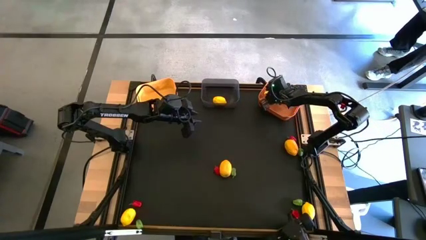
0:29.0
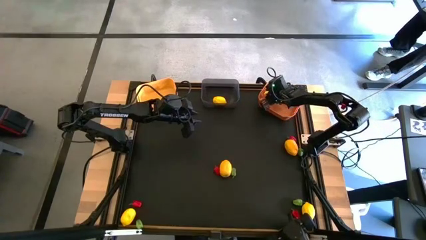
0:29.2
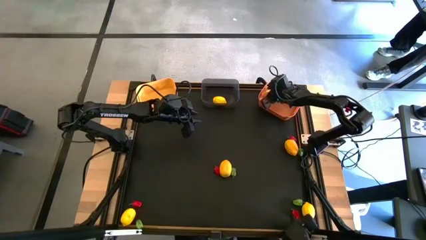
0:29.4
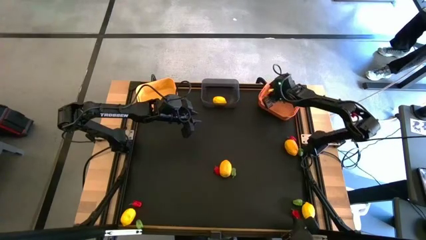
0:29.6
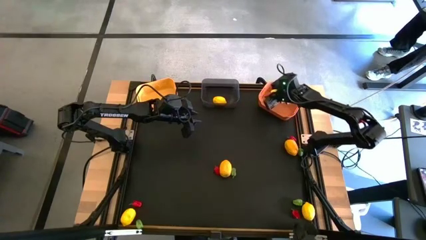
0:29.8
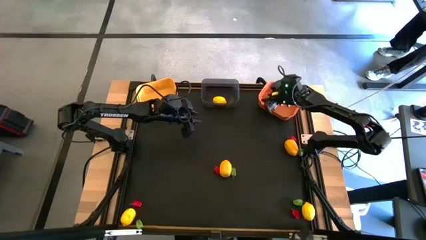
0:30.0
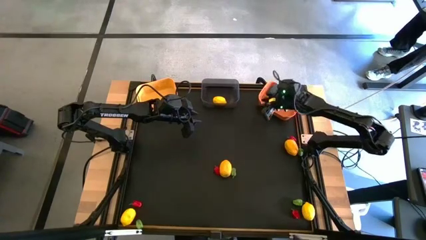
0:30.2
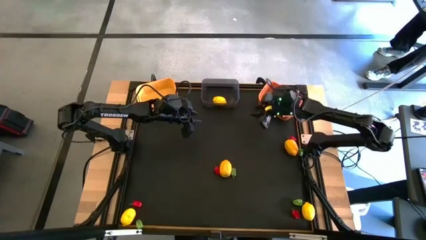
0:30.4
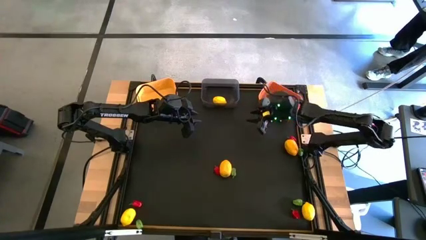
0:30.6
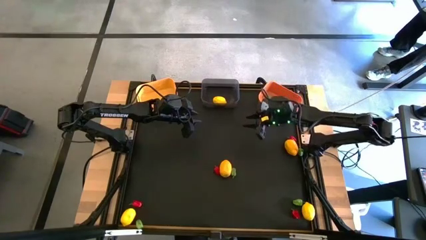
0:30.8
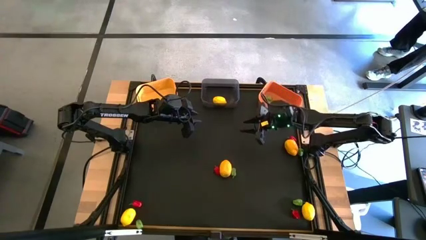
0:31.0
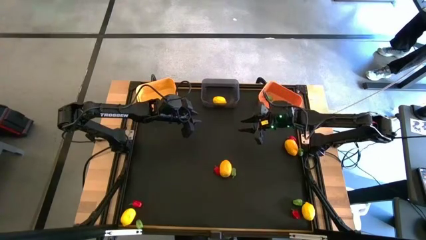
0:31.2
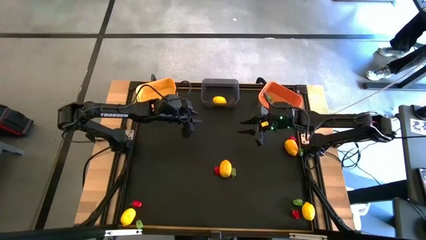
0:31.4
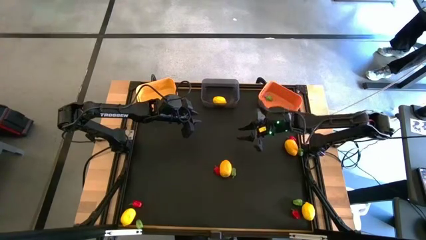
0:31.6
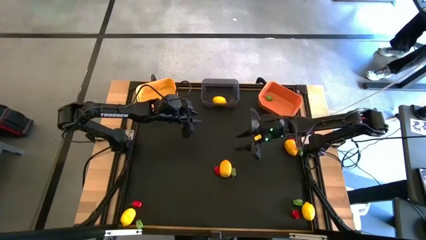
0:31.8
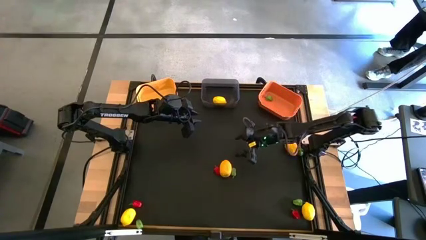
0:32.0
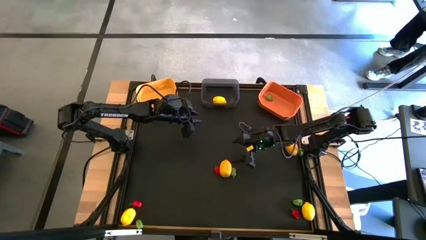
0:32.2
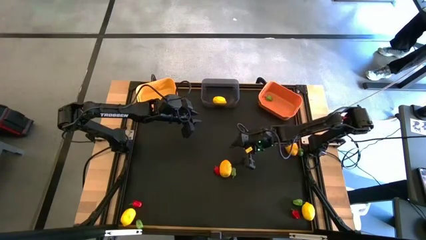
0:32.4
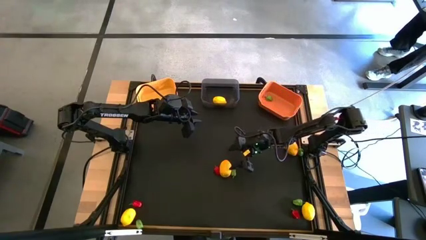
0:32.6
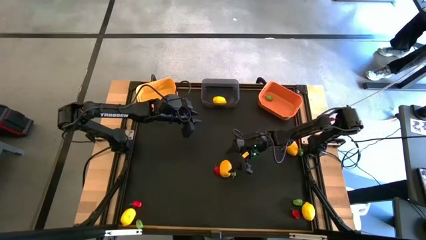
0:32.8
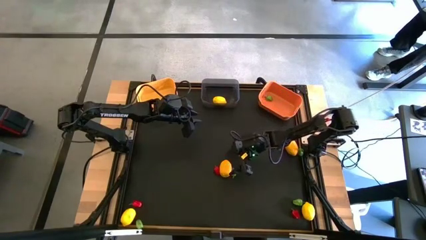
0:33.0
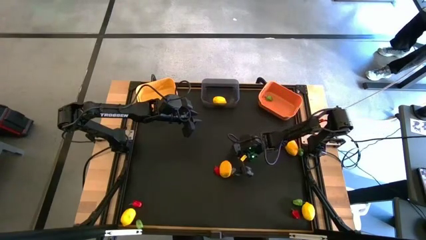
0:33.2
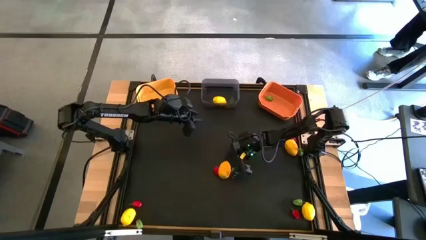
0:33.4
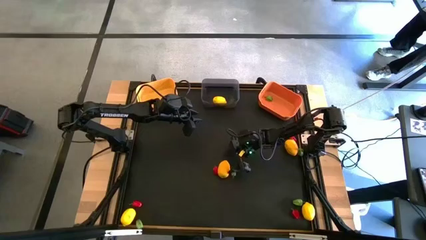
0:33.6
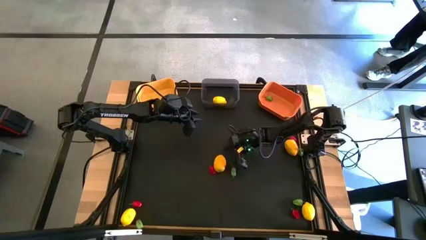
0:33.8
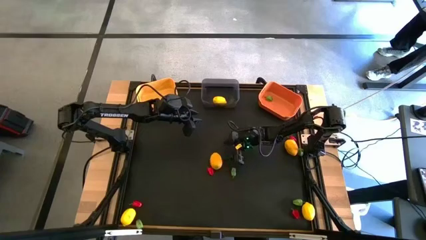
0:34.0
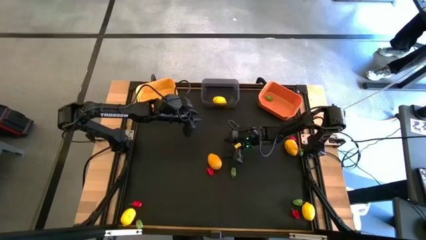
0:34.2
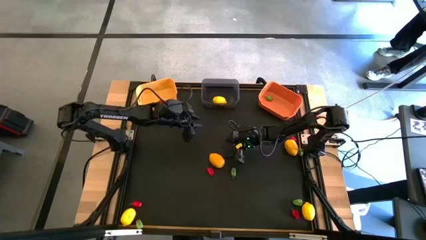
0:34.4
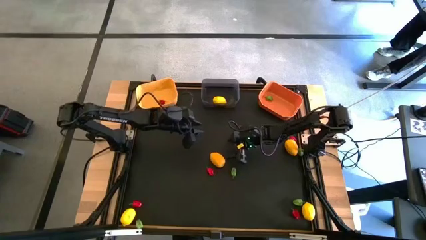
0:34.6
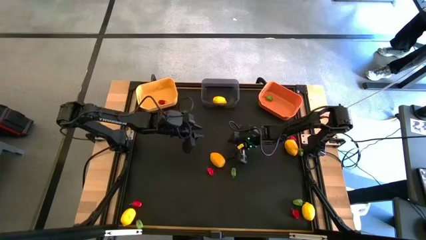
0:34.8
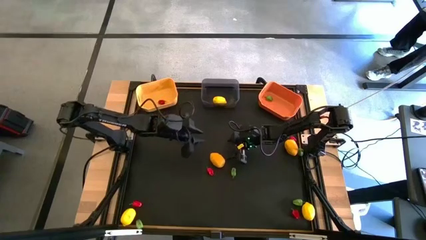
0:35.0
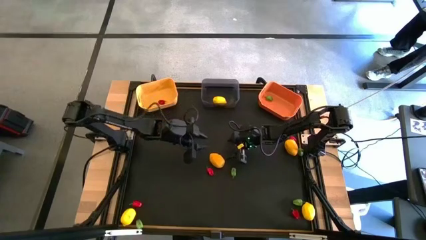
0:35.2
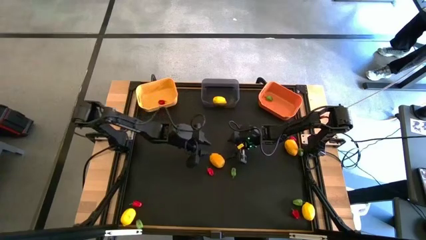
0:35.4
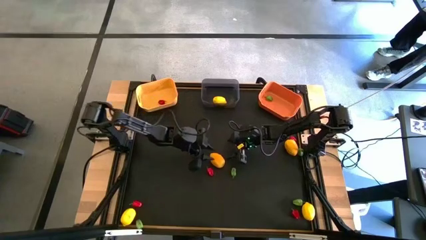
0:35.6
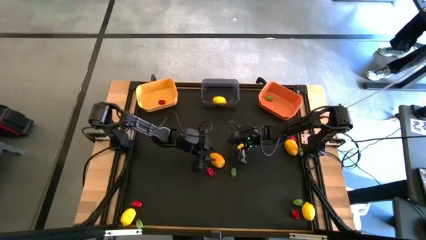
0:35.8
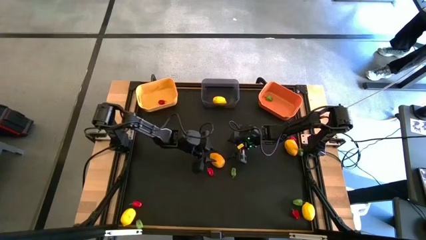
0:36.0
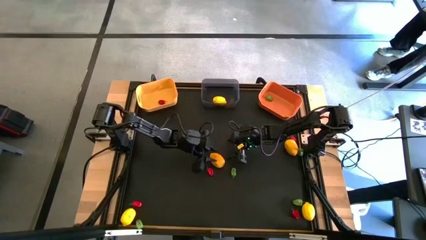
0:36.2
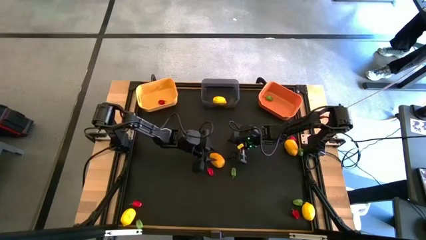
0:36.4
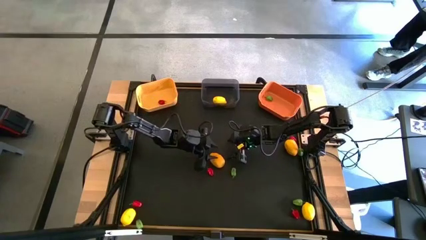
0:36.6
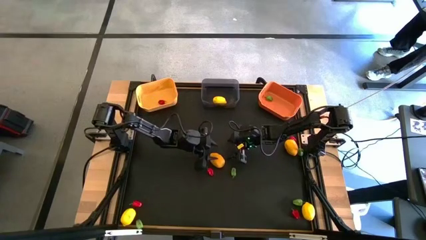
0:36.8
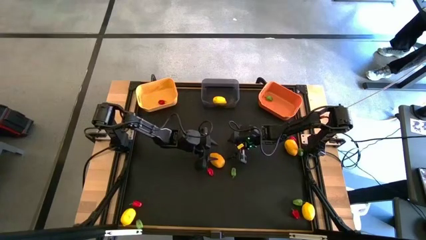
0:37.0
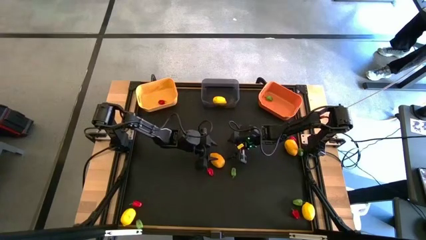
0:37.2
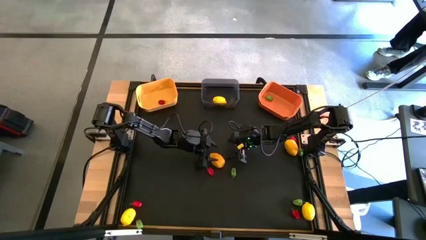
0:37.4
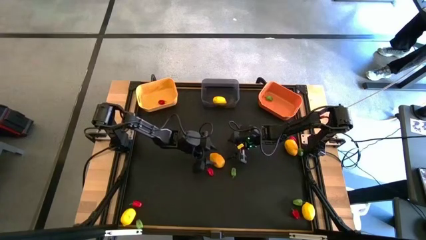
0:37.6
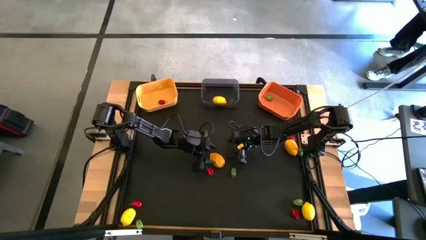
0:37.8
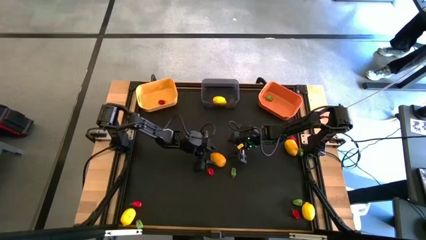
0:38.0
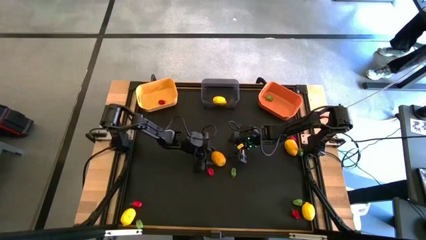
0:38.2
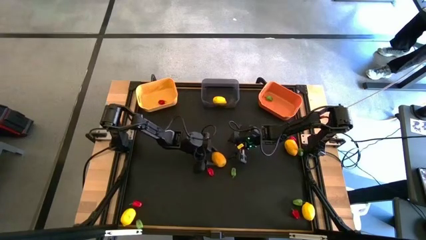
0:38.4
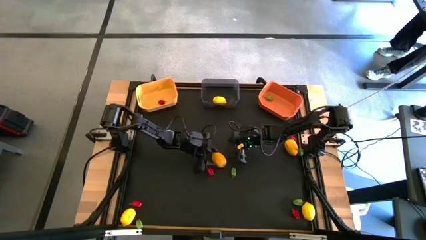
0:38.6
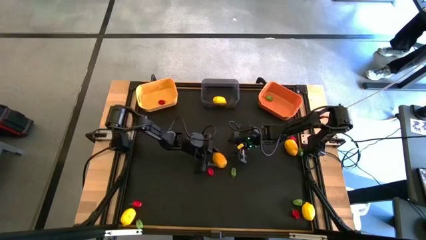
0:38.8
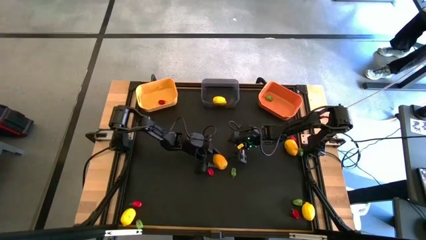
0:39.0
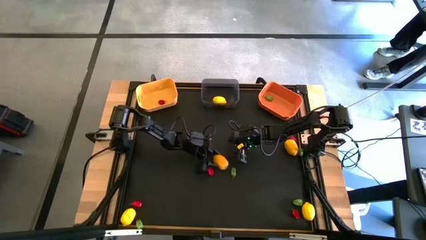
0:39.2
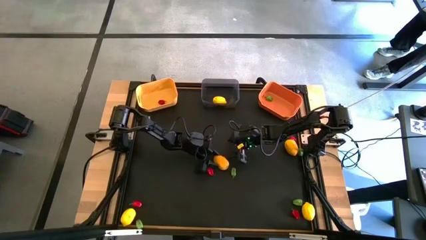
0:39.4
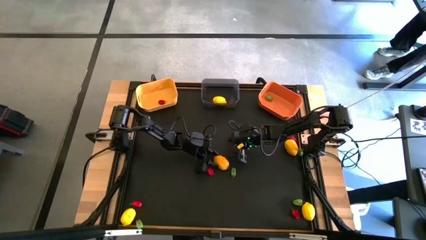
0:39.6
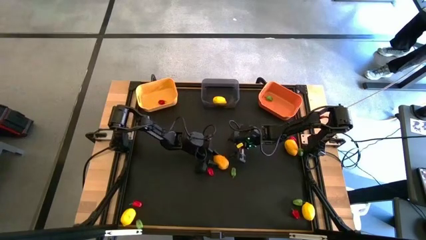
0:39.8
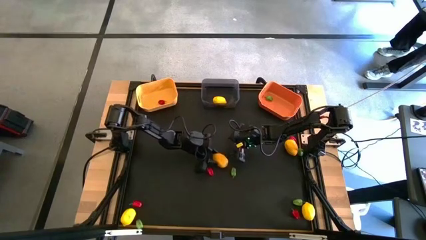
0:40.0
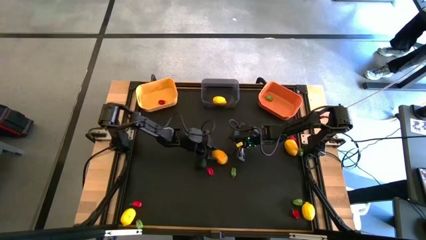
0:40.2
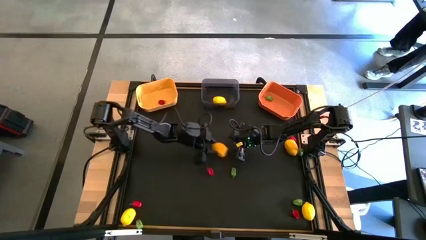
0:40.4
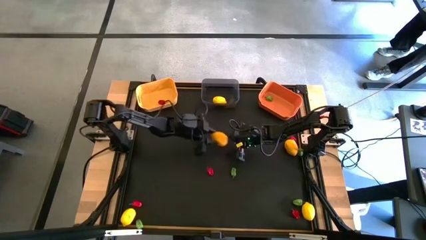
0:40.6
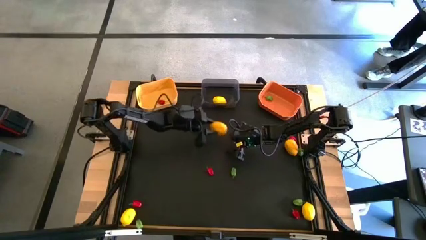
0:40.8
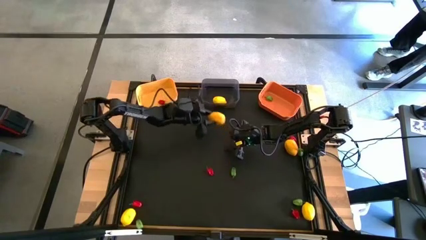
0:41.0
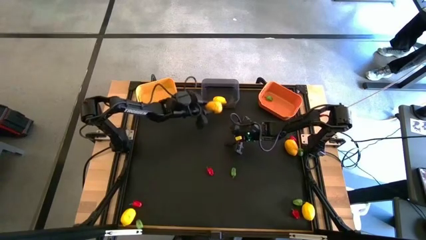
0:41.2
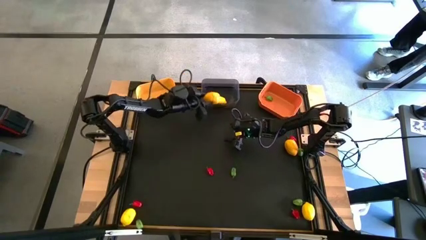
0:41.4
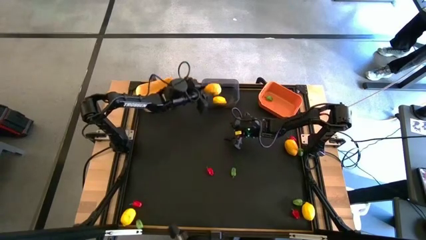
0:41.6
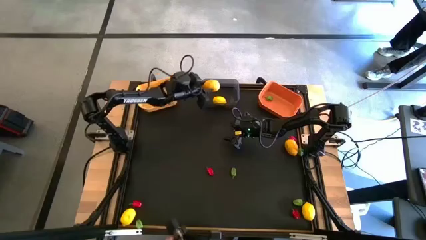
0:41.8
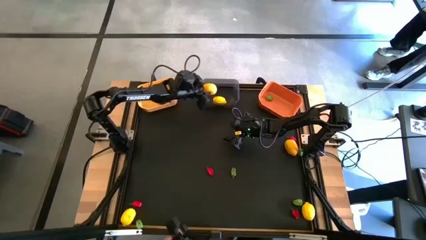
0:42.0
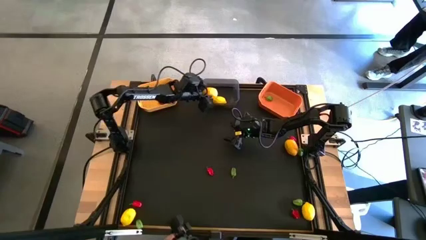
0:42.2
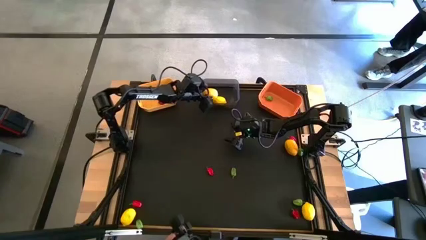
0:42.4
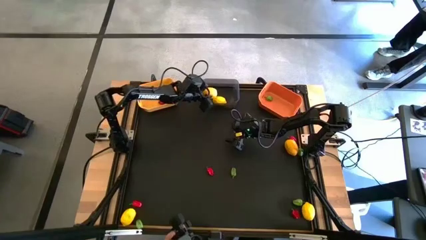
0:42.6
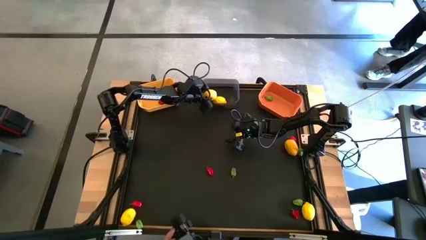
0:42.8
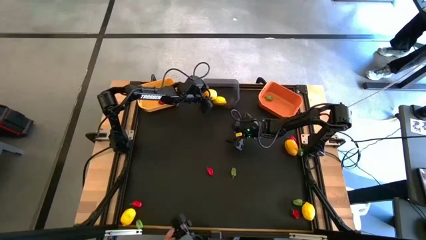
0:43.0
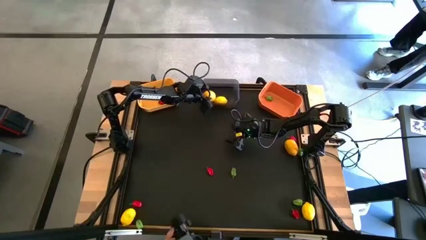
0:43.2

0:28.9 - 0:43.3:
Task: Sort produce into baskets
Put the yellow lemon into the black bin

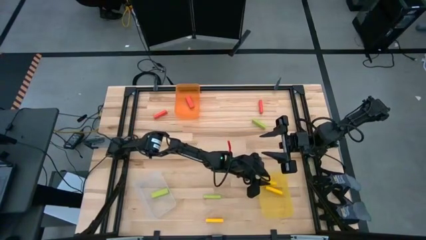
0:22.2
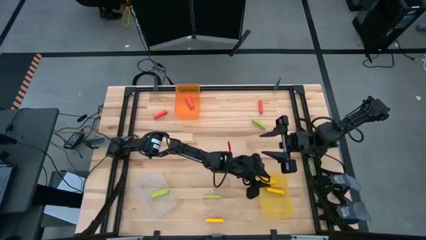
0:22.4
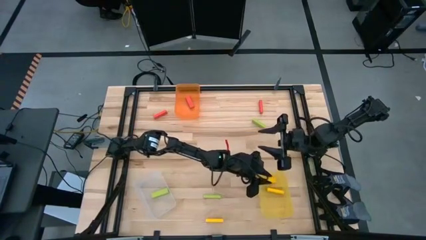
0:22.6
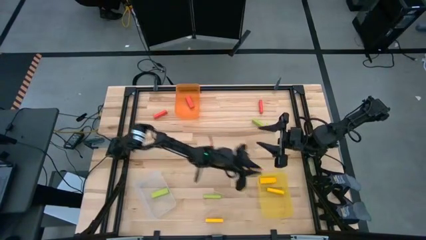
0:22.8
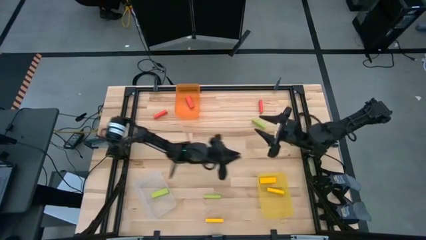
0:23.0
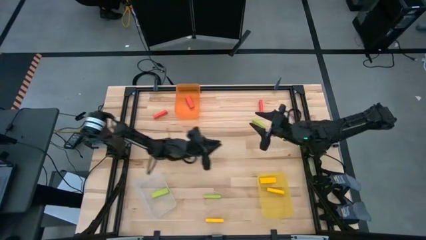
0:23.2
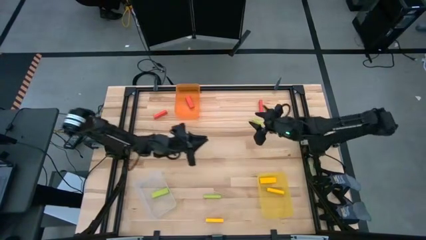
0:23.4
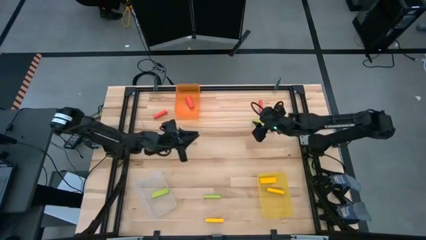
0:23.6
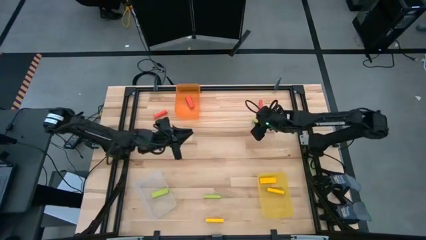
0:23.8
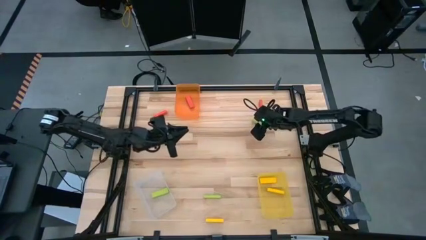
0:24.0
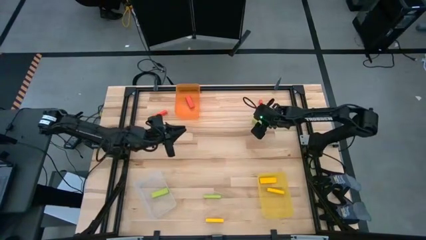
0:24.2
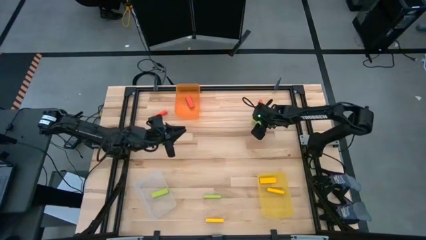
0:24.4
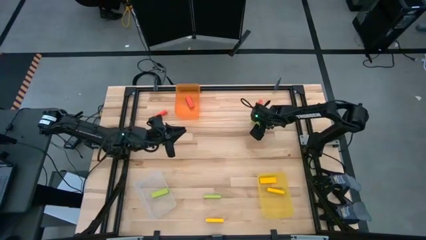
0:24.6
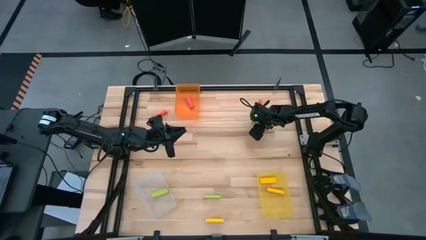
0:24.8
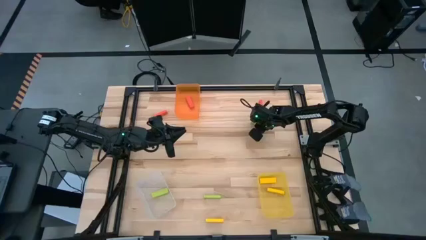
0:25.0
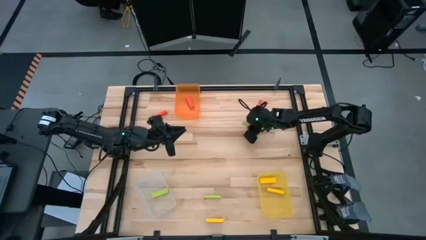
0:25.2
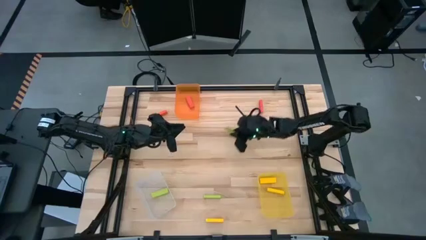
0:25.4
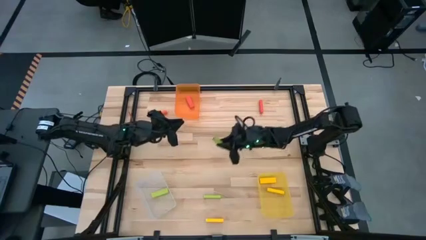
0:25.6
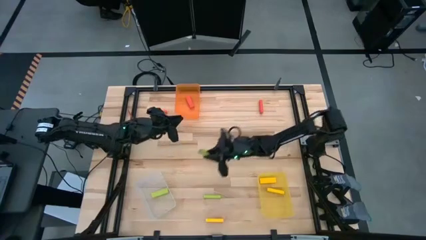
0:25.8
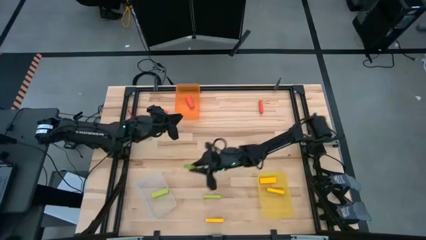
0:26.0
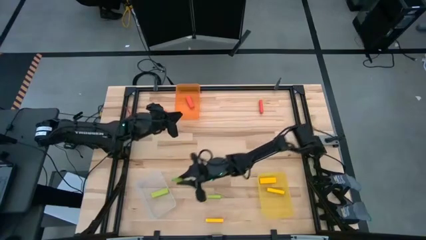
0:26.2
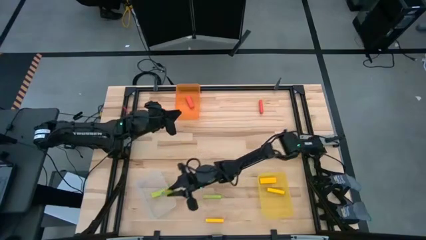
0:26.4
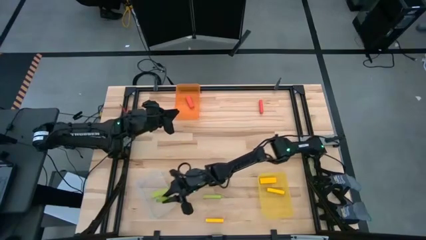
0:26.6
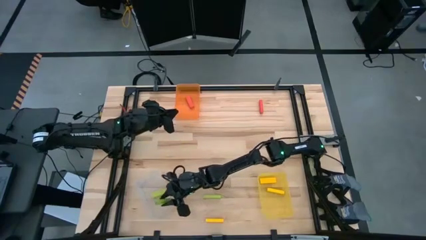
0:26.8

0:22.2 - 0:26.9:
Task: Sort blocks
Put the top green block into the transparent bin
